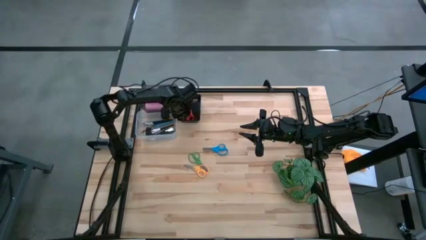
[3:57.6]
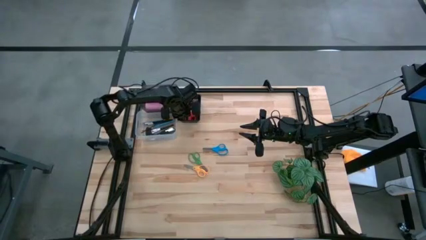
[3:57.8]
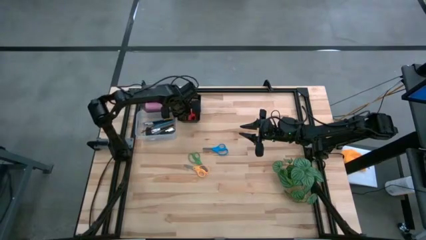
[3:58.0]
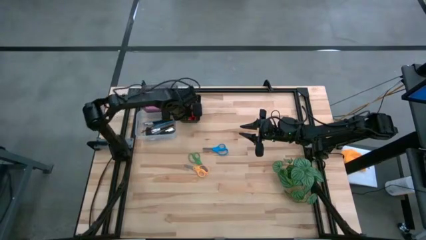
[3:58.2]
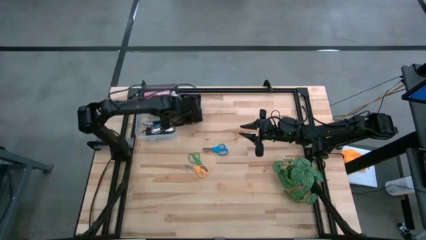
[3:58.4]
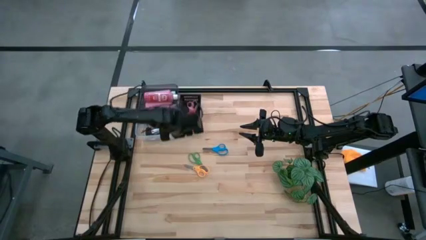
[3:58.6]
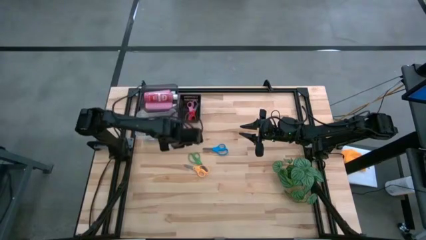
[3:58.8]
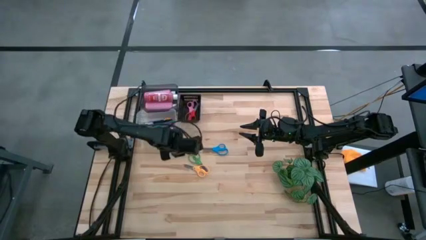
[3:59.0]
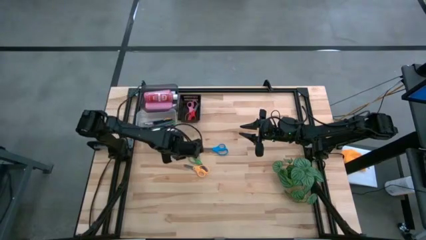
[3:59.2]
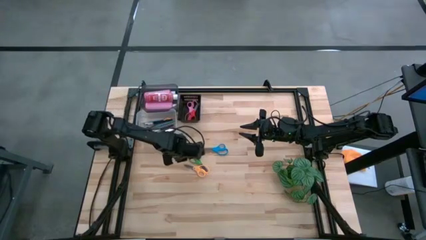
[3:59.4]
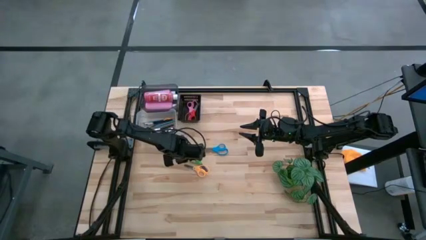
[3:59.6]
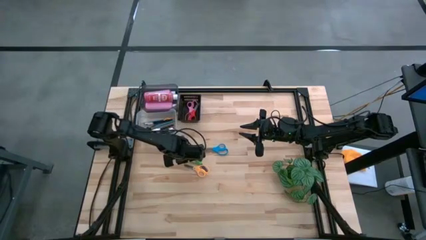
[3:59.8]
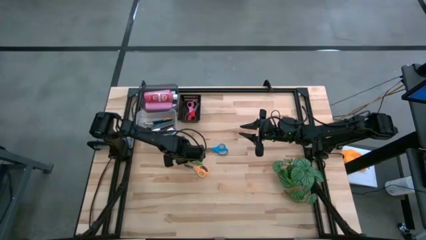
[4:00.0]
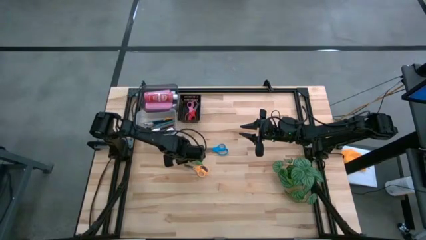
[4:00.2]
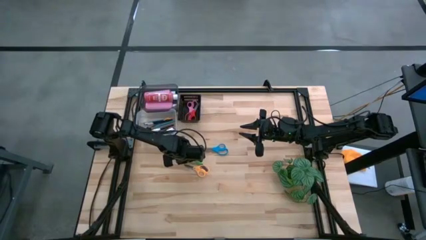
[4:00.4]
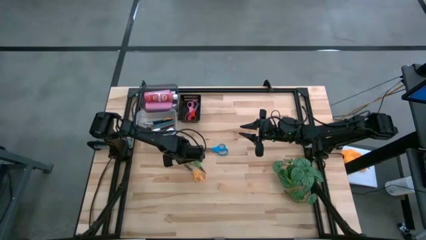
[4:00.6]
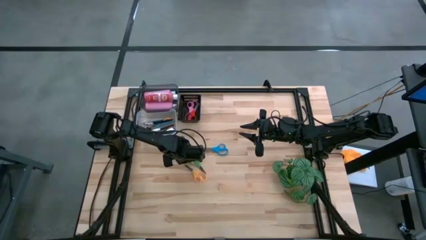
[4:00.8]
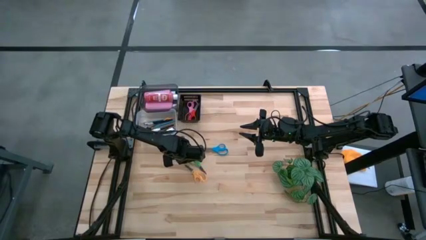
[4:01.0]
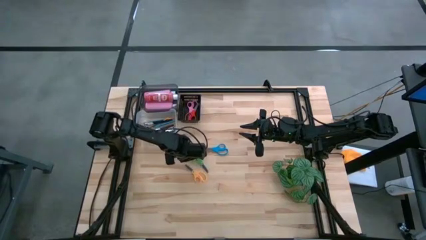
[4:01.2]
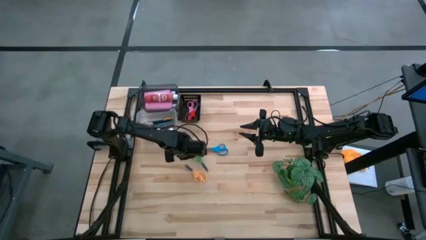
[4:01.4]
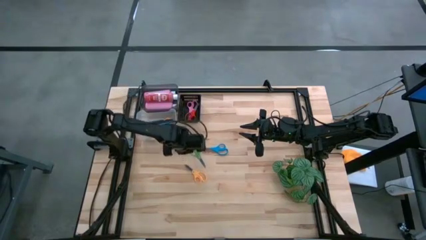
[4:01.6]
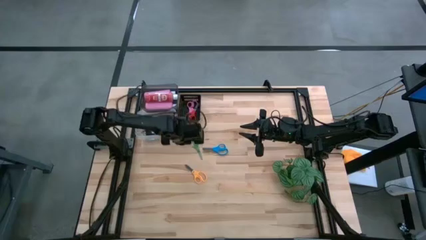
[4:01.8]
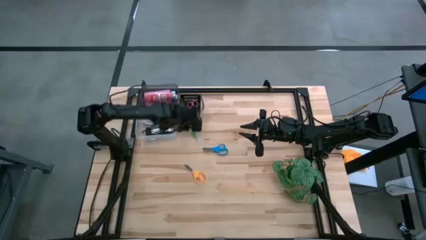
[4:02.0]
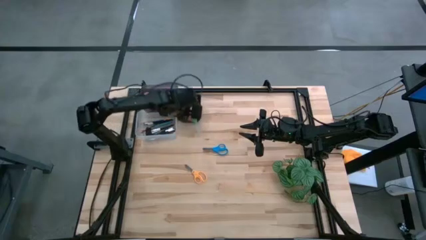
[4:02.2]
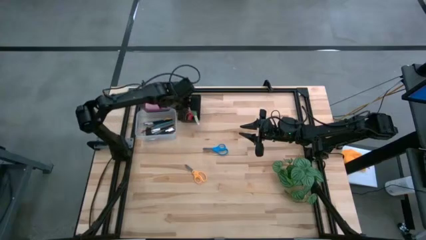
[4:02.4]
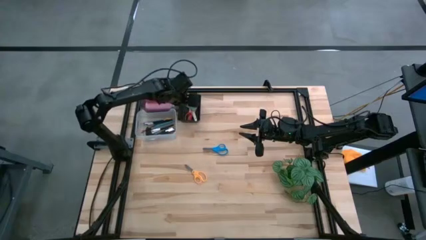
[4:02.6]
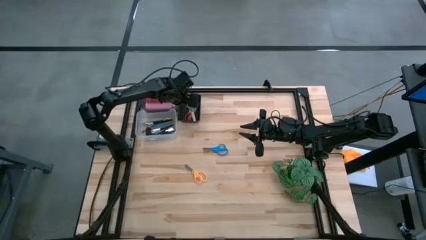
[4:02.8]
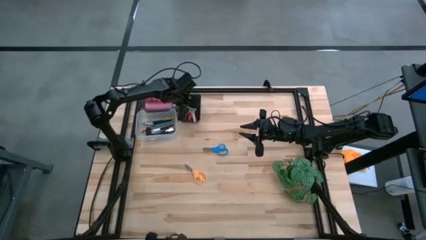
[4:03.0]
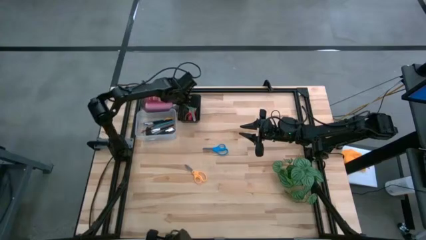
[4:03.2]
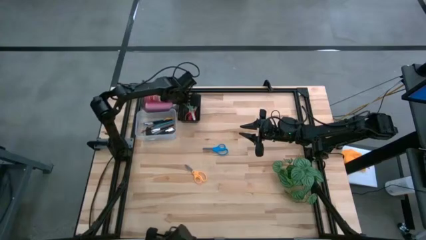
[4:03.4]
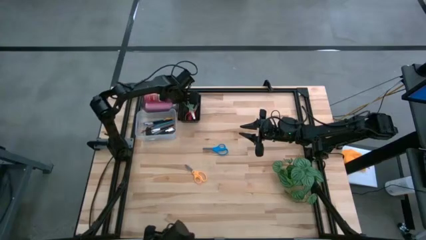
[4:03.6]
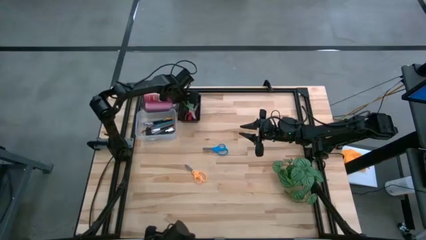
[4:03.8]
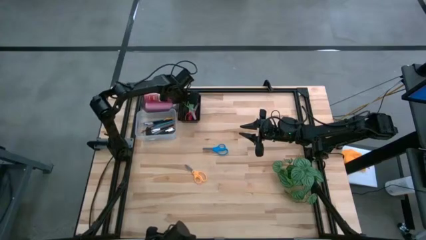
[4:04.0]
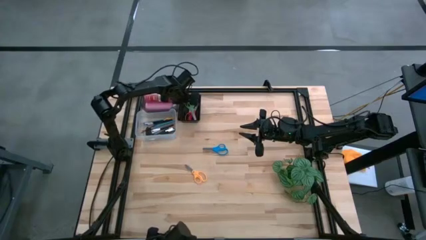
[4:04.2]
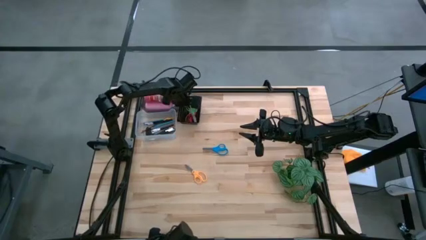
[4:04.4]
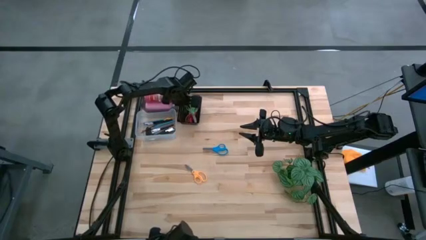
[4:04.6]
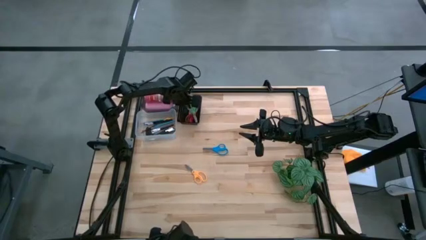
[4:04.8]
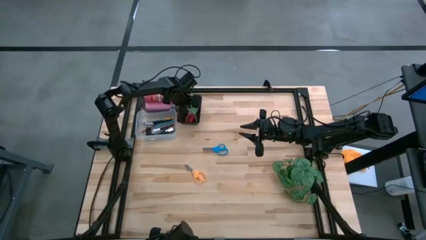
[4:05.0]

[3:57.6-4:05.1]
Task: Pick & Place Paint Supplies
Put the green scissors into the right black bin

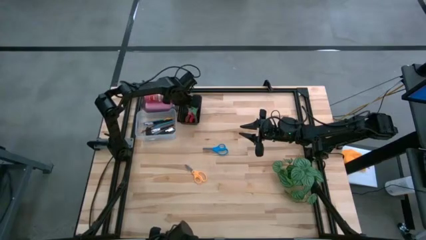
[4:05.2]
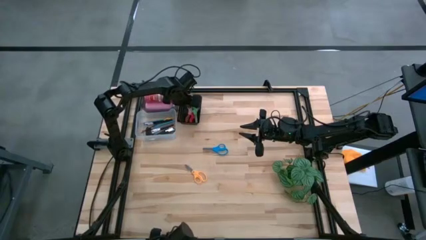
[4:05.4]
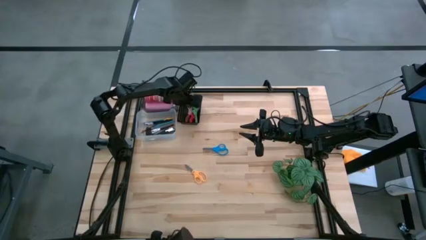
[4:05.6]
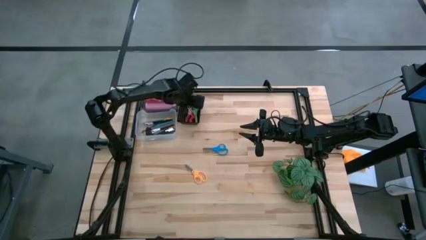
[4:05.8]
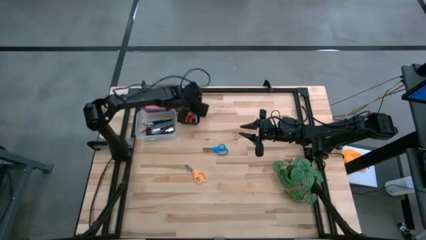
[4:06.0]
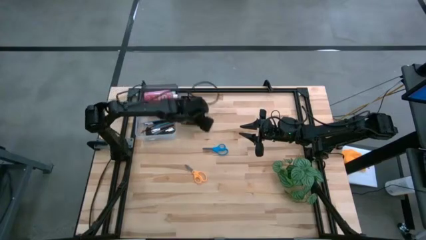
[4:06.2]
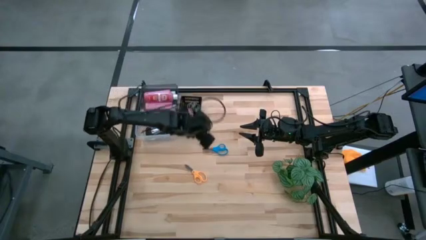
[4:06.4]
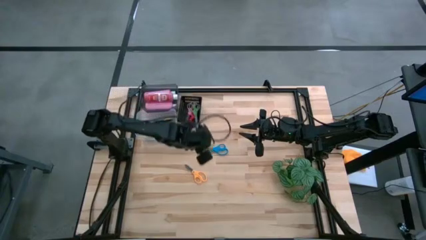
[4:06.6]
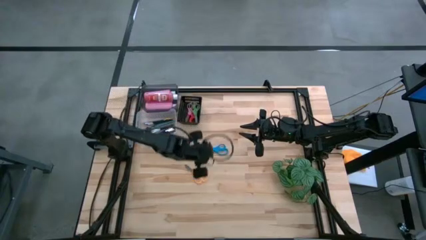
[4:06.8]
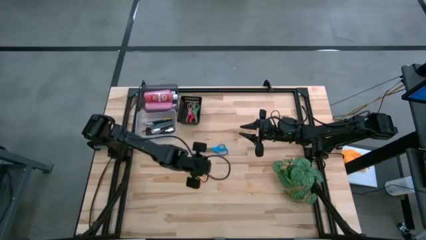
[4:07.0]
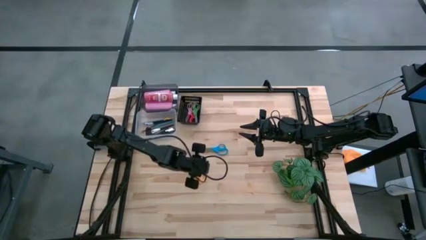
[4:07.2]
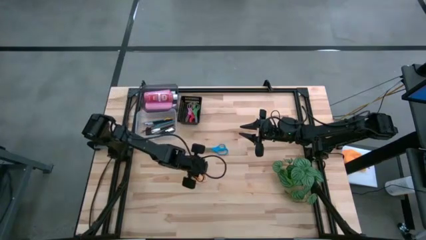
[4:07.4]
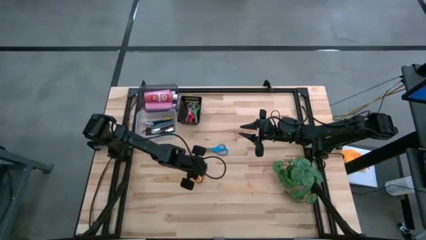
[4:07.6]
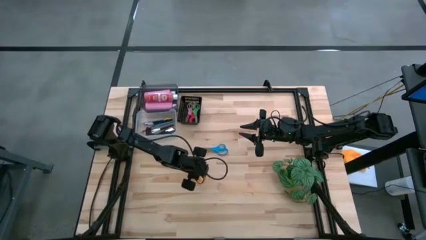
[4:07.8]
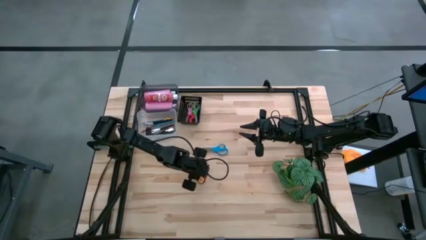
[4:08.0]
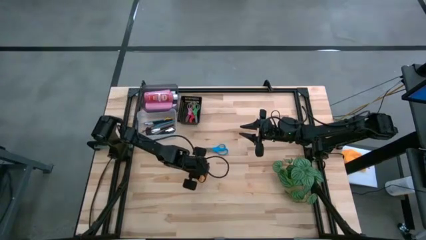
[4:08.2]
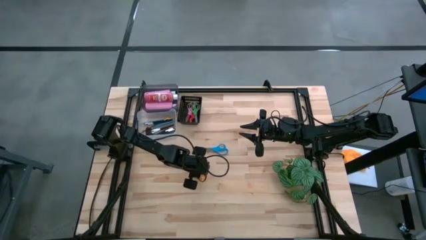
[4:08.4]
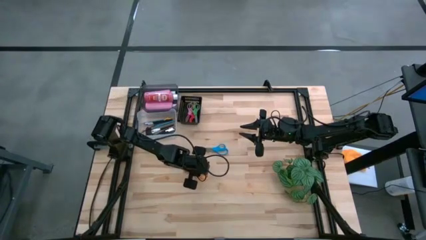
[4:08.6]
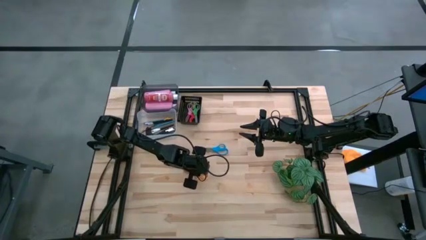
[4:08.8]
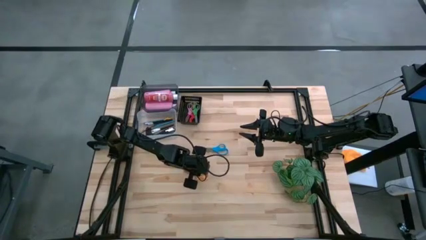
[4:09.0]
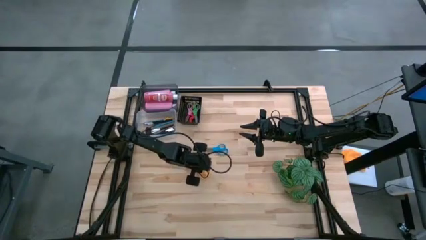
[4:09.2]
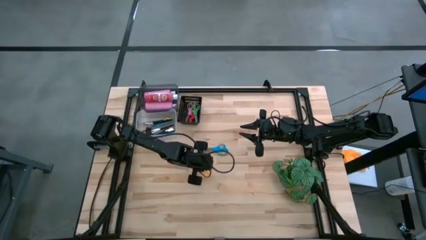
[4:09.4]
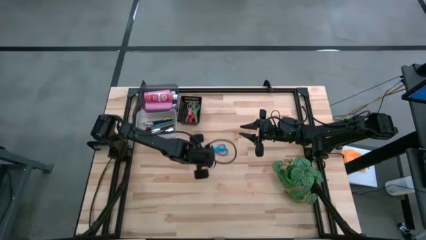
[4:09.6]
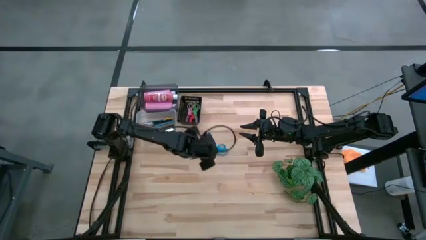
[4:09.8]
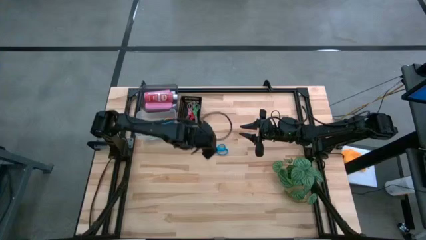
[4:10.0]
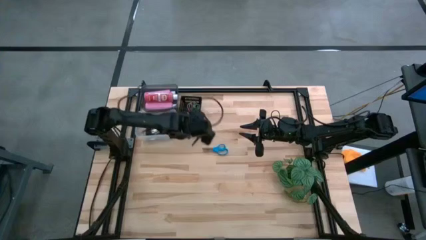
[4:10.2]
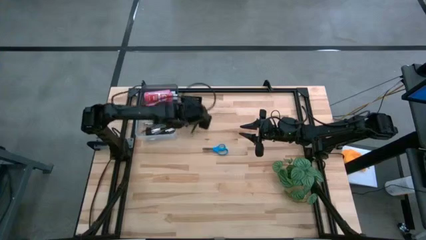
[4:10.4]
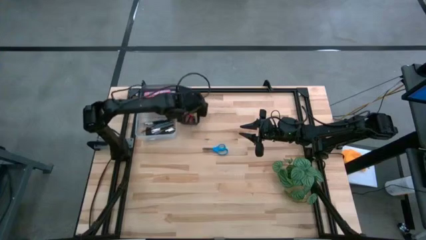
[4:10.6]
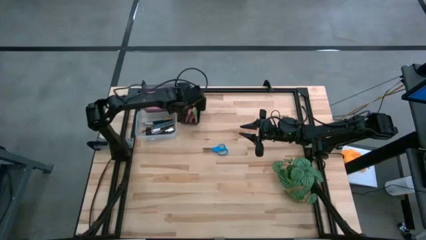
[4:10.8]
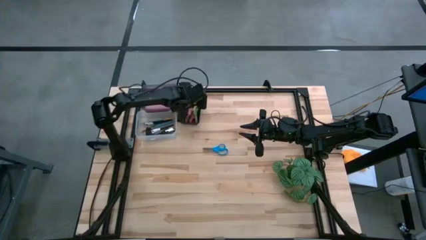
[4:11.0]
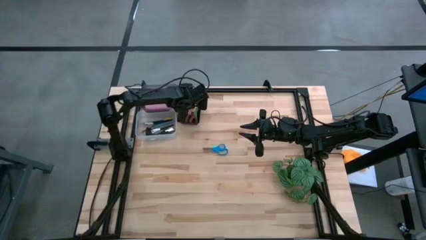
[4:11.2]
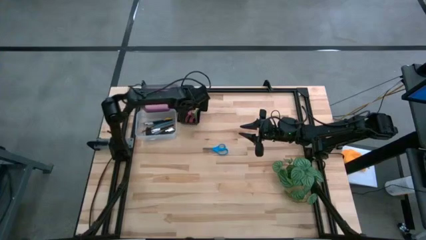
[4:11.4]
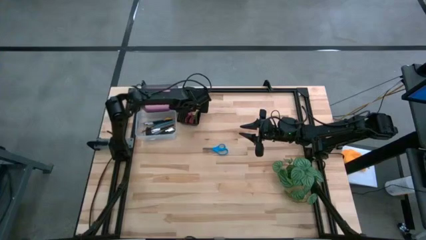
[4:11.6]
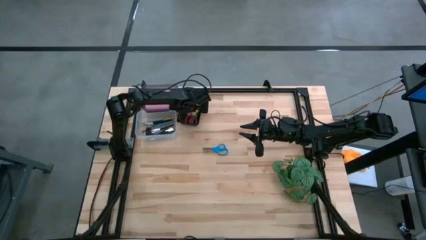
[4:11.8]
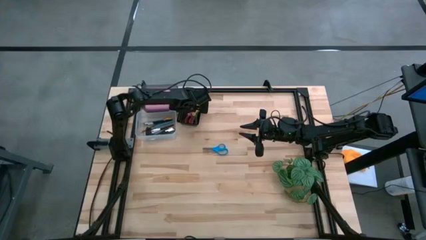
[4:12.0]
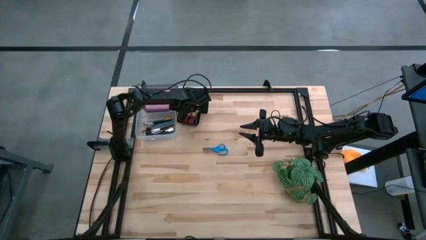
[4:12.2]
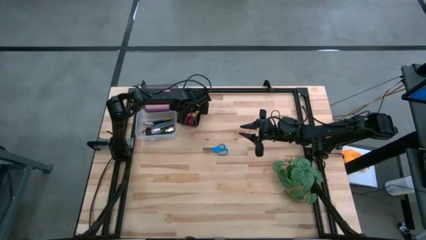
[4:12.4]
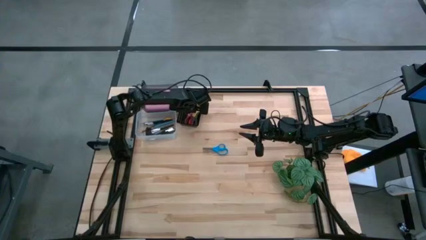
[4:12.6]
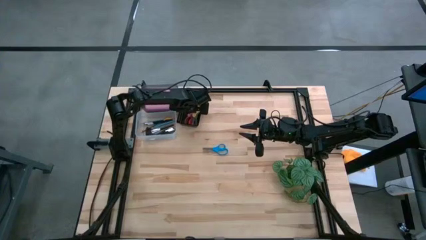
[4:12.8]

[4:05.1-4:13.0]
Put the yellow scissors into the right black bin

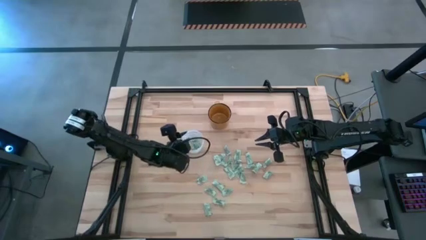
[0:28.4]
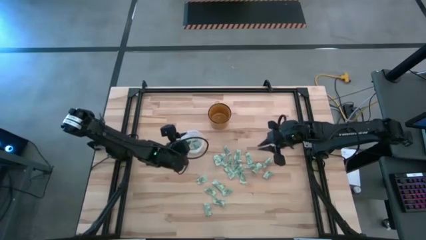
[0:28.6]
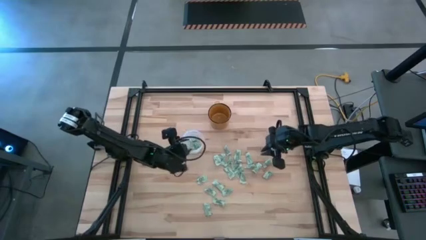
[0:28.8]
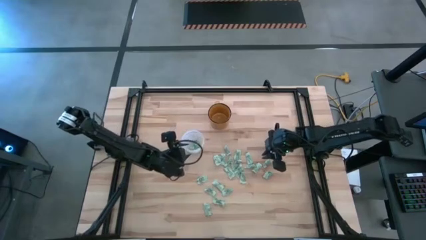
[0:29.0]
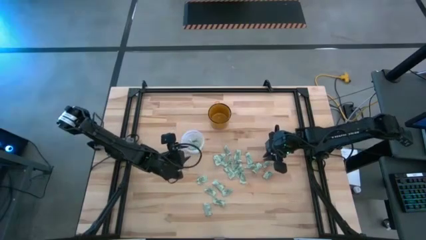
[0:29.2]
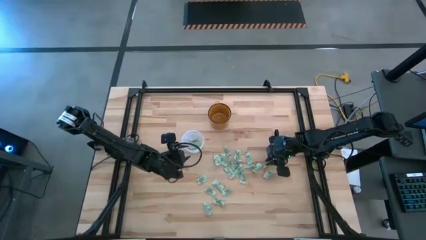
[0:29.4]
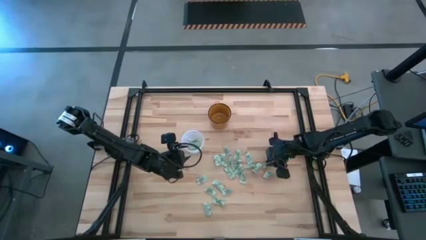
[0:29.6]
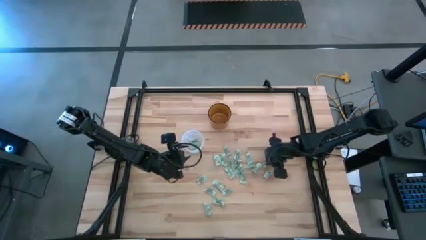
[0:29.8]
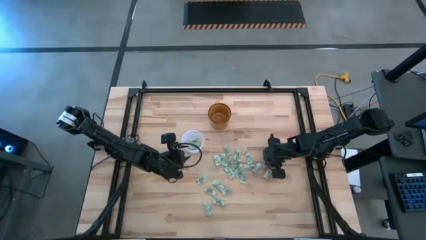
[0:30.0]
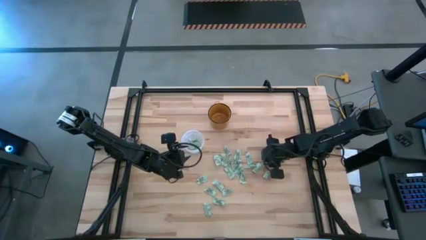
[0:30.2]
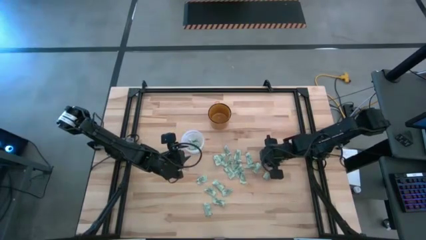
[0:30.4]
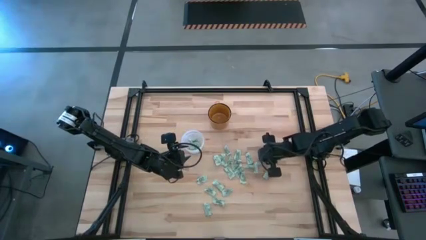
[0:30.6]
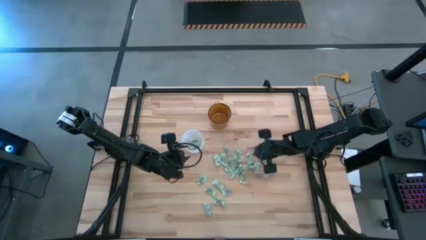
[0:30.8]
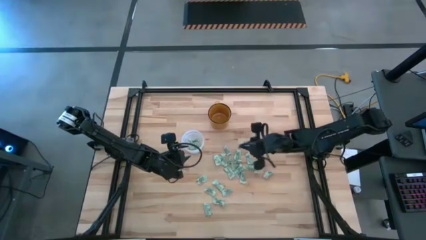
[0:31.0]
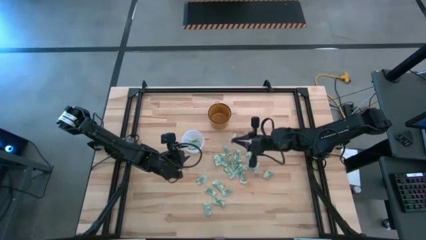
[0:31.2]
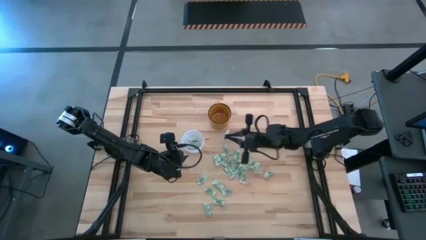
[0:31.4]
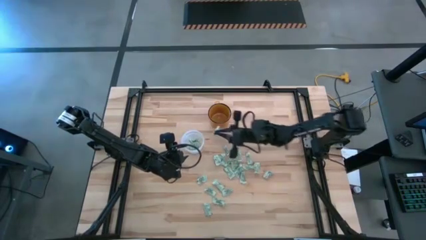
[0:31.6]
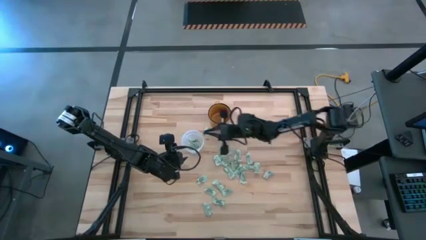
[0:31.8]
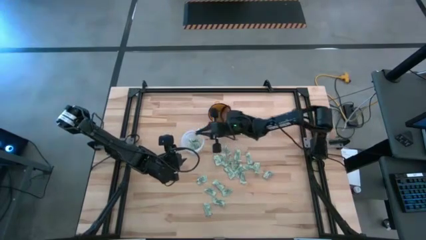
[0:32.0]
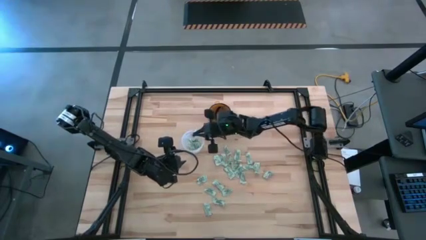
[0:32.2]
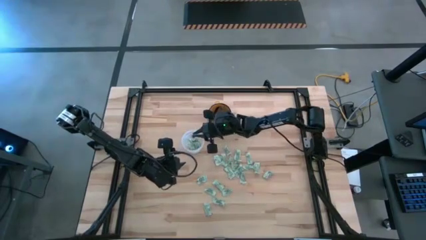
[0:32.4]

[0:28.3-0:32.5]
Task: Pick and place Stevia / Truvia into bins
Put the stevia packet into the transparent bin
